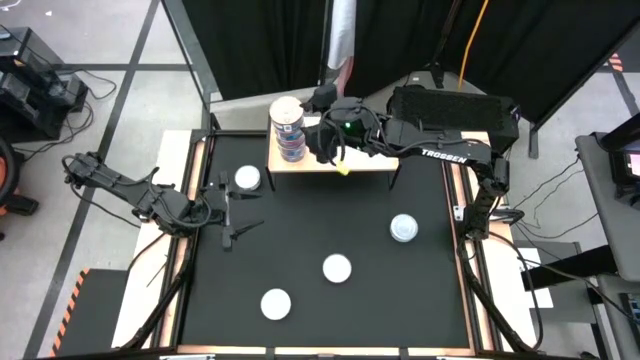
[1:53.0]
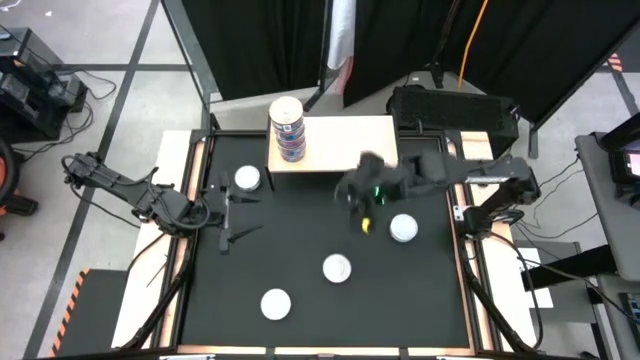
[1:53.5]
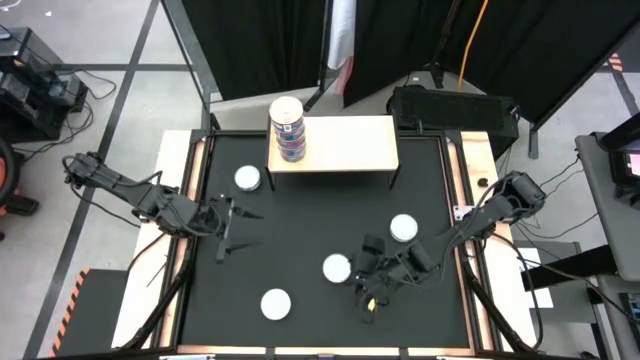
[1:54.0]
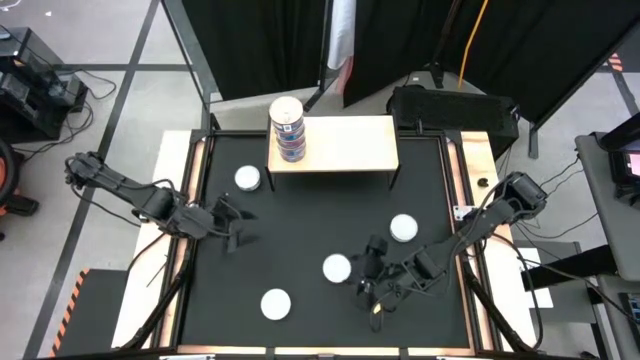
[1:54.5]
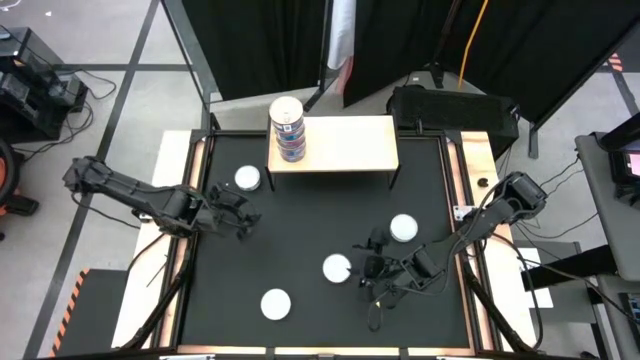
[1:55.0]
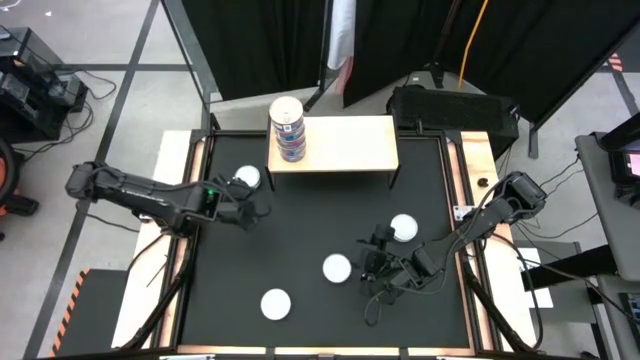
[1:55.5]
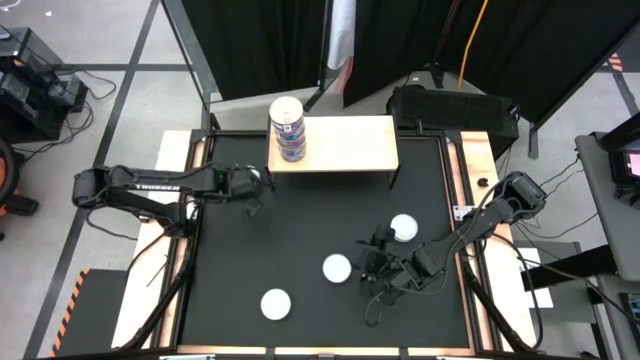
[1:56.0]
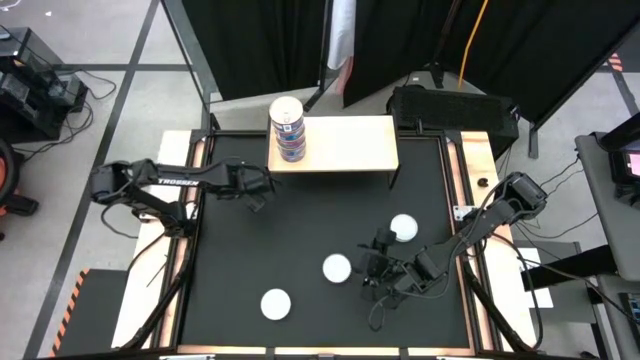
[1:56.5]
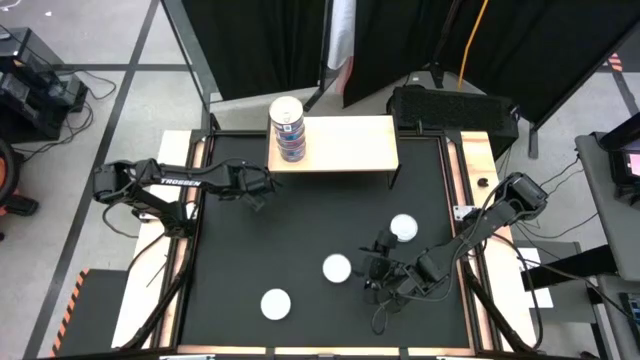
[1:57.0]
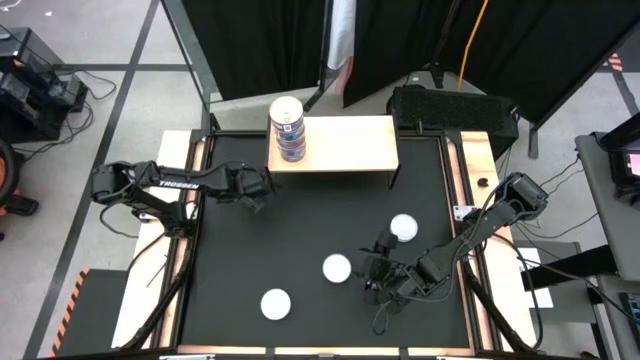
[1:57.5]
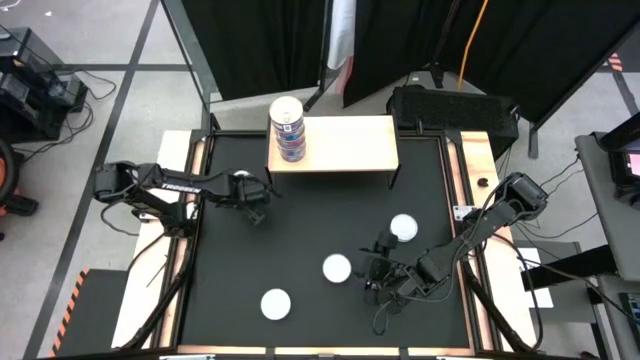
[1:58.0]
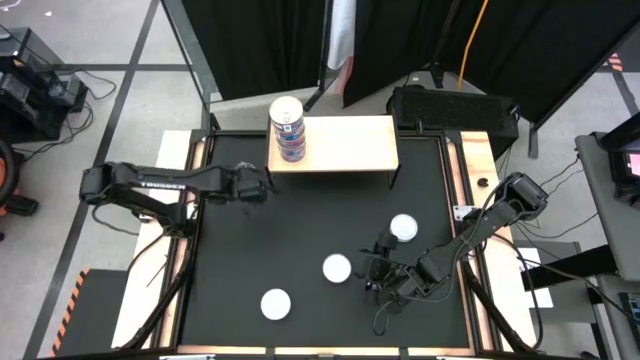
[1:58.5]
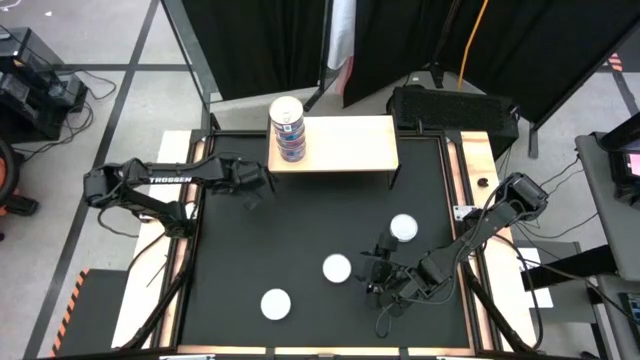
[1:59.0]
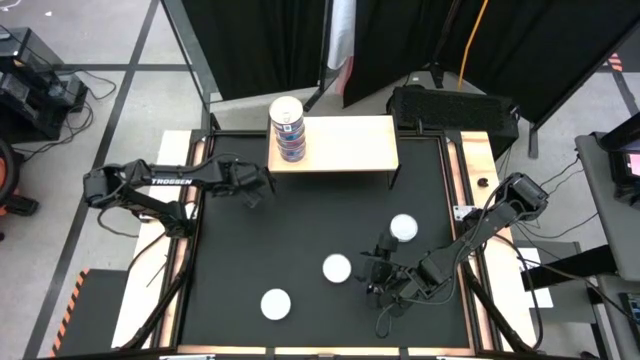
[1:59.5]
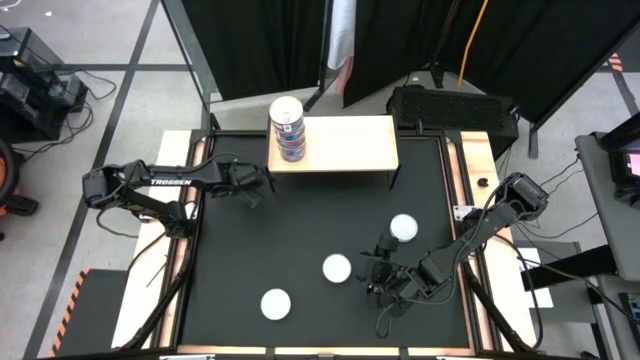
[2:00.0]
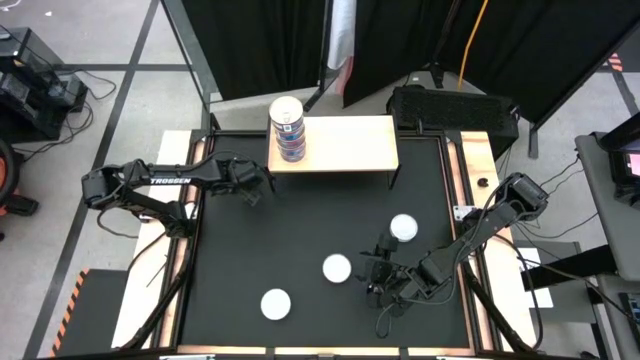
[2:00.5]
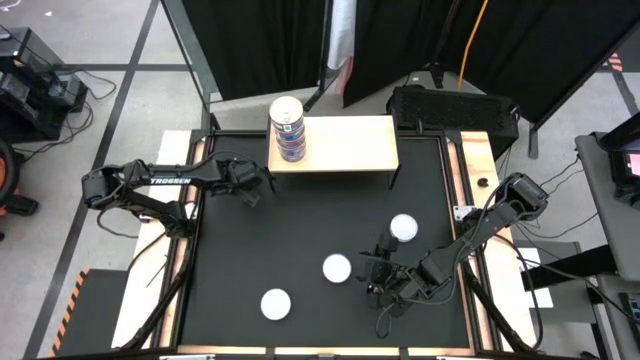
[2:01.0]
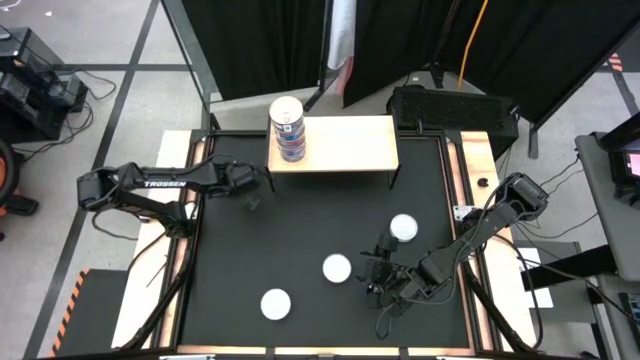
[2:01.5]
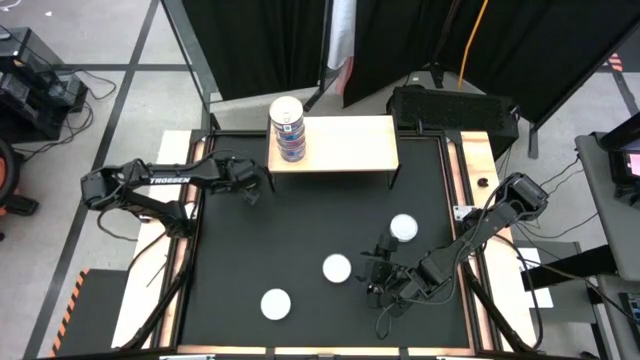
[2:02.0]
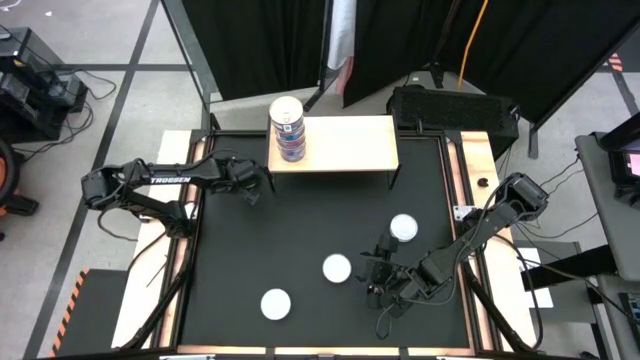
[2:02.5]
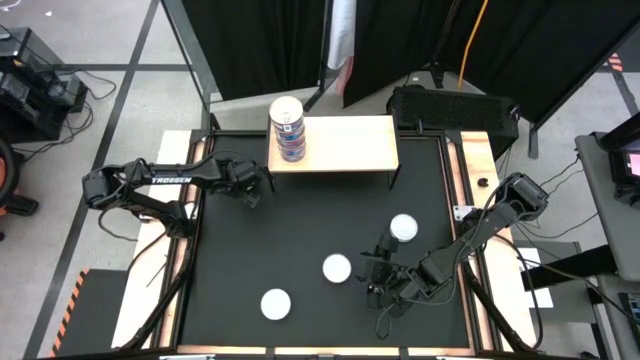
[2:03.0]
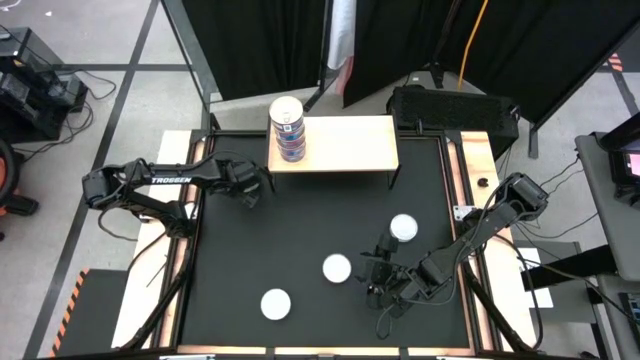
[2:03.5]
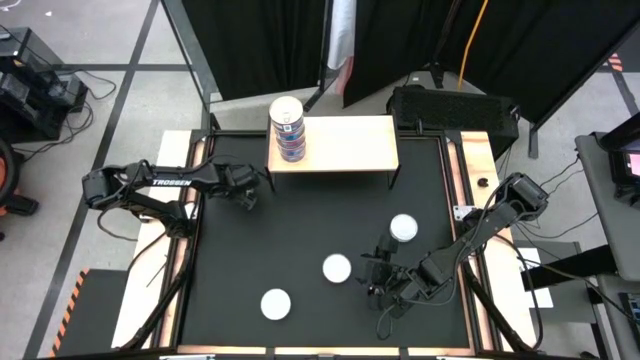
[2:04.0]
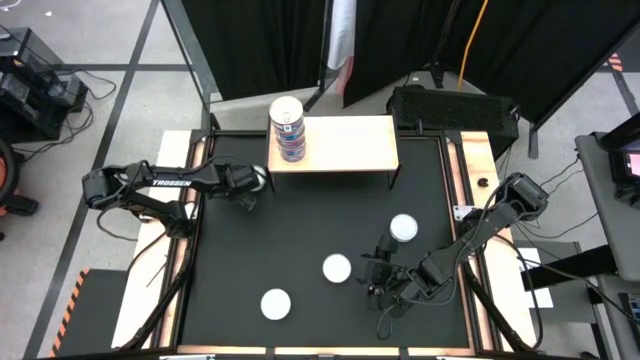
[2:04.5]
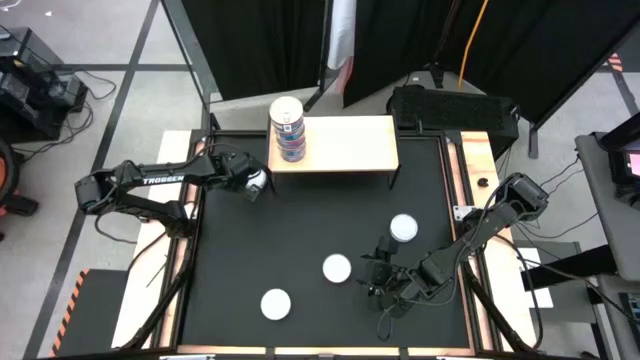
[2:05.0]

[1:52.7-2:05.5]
Task: Stack canned seafood by type on shelf
Put the green tuna can on the shelf

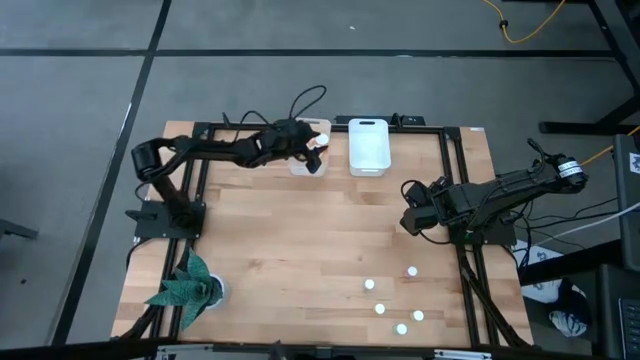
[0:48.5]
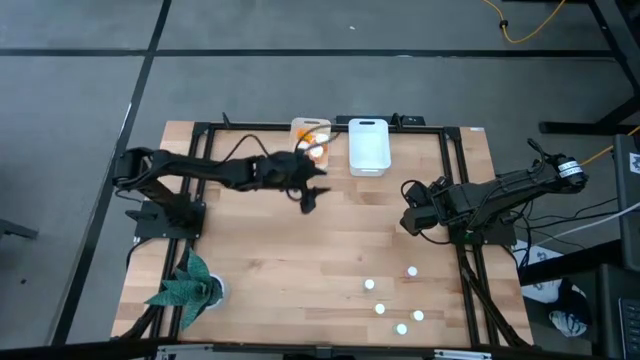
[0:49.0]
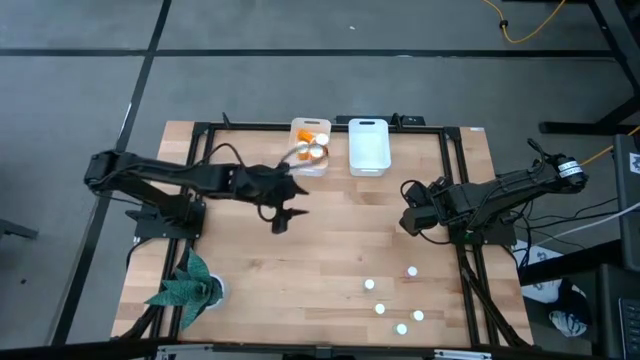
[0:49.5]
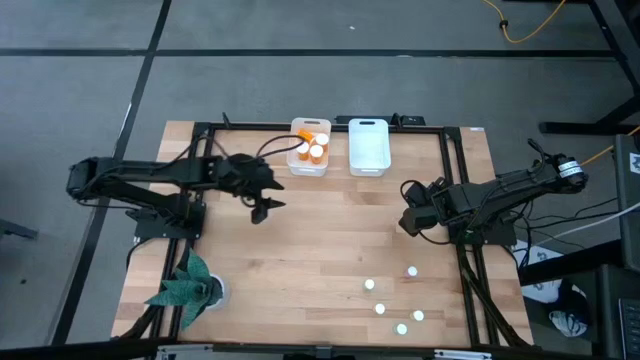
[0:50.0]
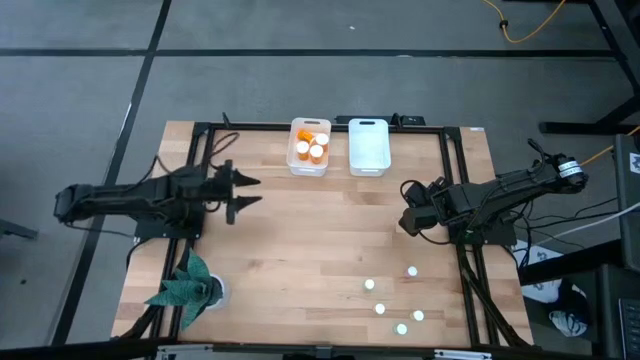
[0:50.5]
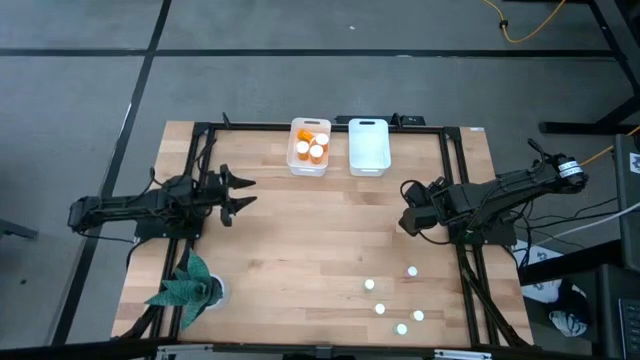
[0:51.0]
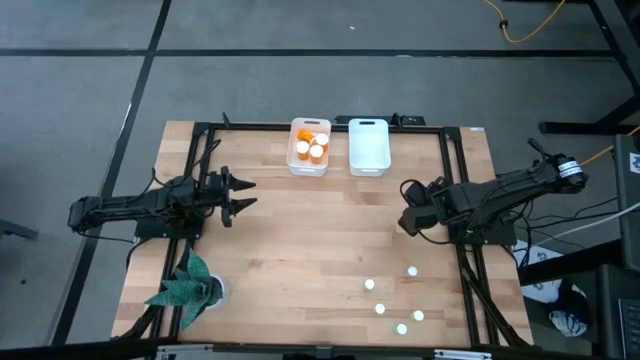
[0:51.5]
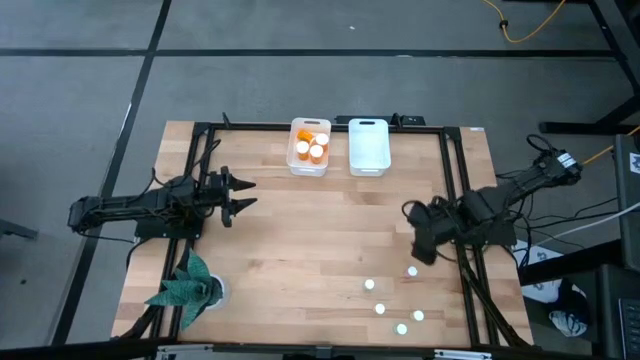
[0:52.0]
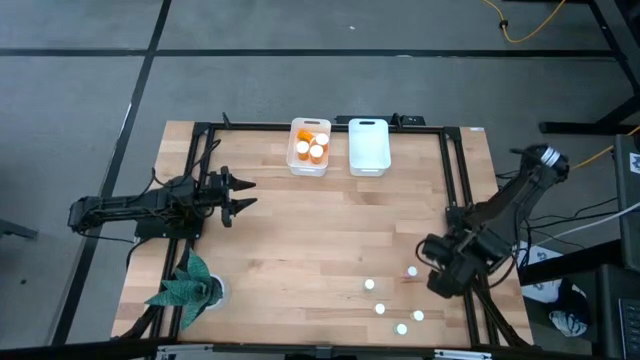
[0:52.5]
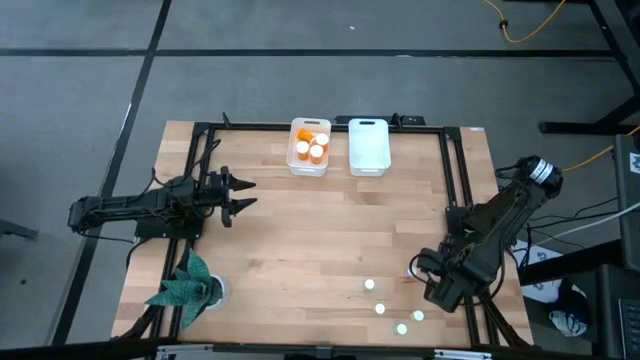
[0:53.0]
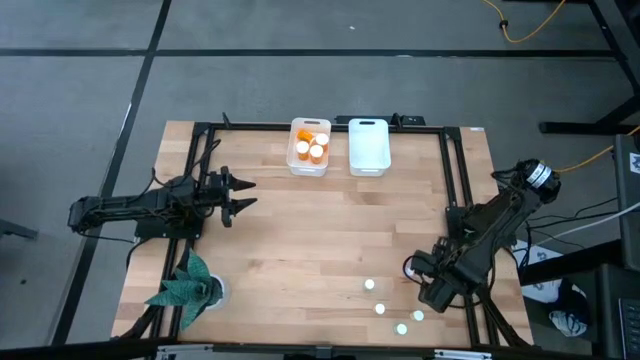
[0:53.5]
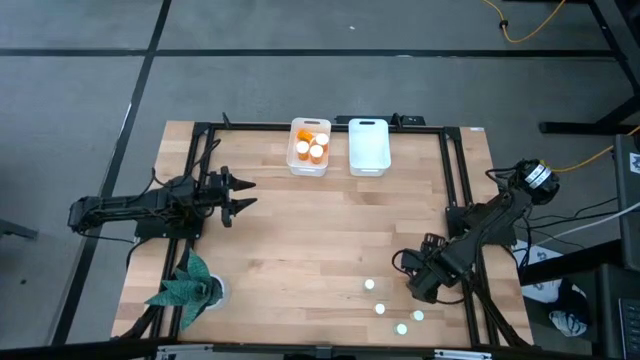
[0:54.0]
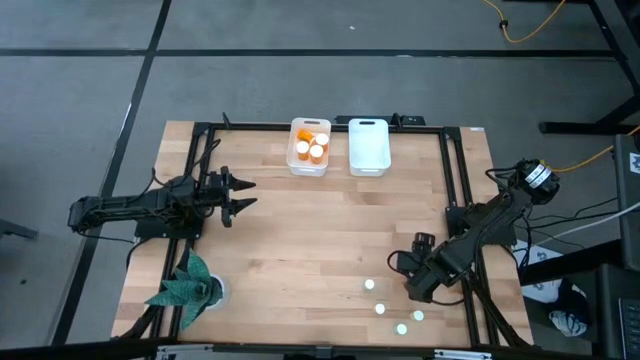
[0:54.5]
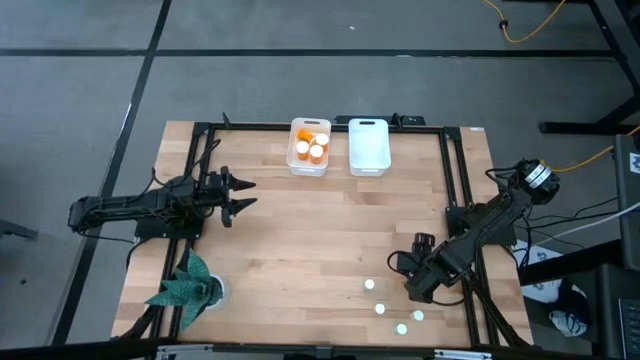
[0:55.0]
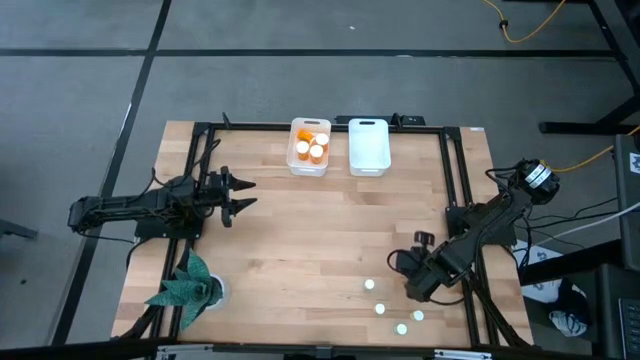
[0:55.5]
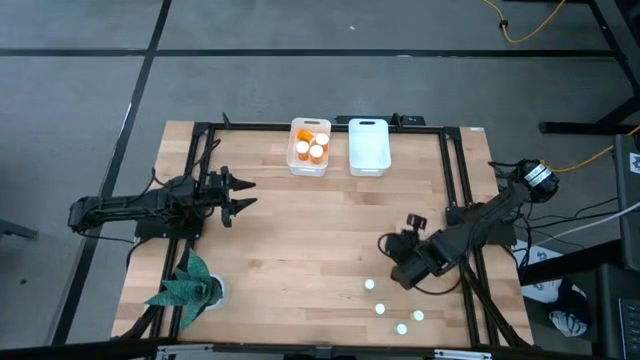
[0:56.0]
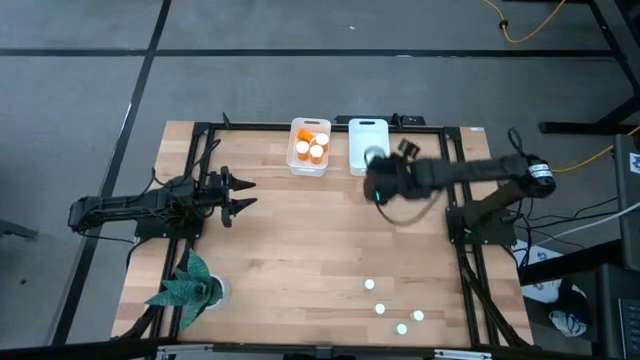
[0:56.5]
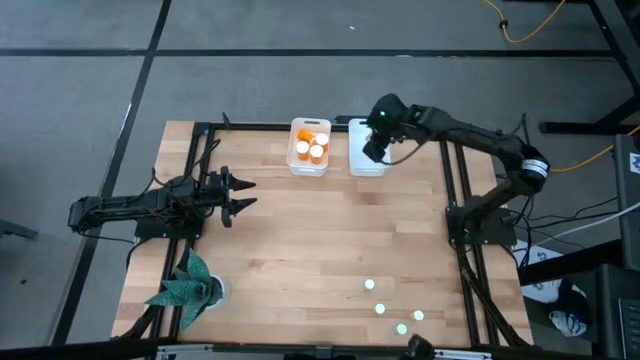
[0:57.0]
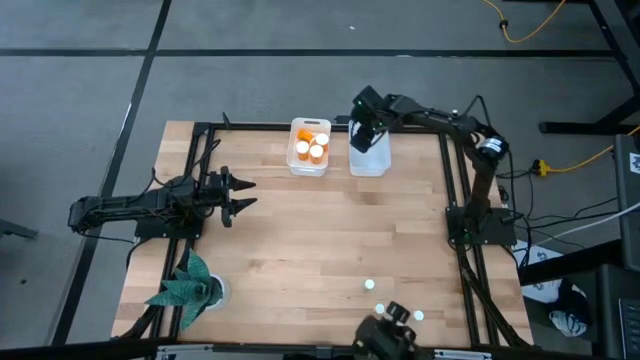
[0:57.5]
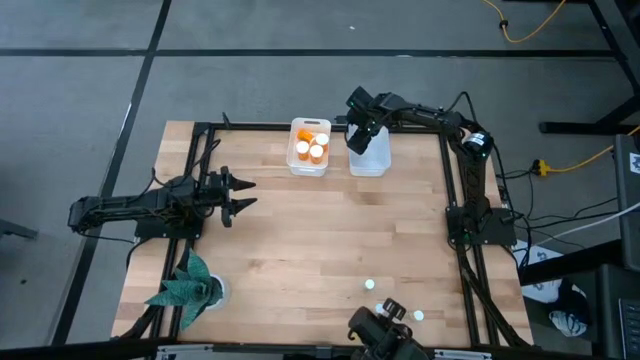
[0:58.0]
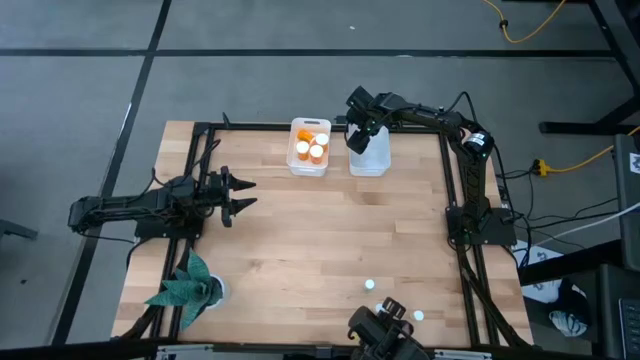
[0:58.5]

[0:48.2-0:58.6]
Task: Pick and place medicine bottles into bin by pill shape (circle, oval)
Put the pink tablet bottle into the right white bin
